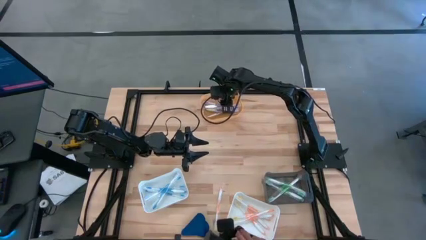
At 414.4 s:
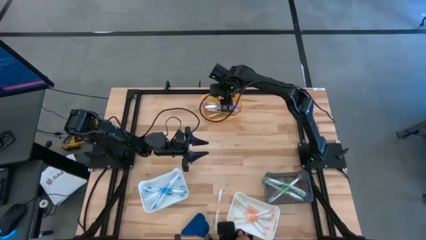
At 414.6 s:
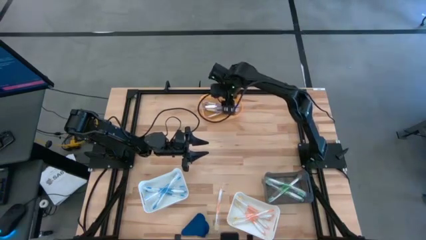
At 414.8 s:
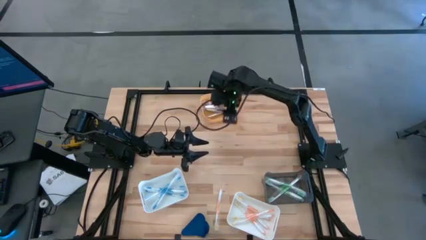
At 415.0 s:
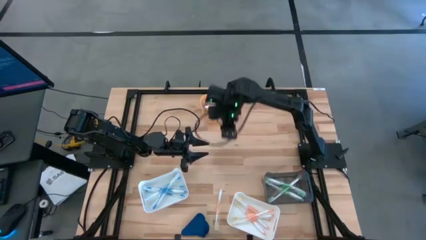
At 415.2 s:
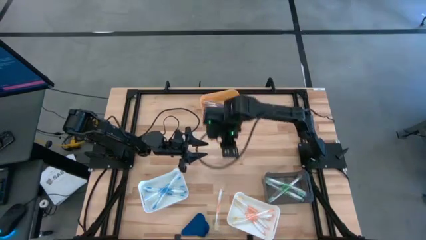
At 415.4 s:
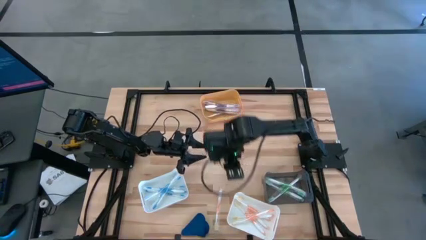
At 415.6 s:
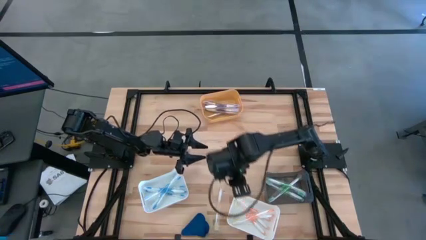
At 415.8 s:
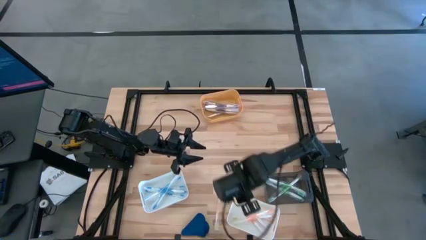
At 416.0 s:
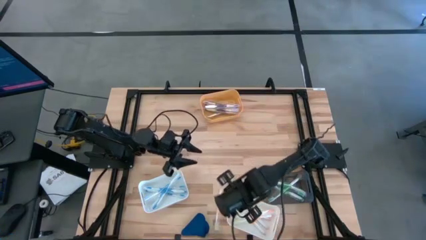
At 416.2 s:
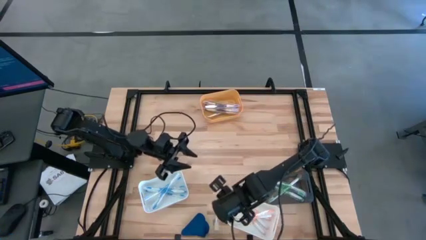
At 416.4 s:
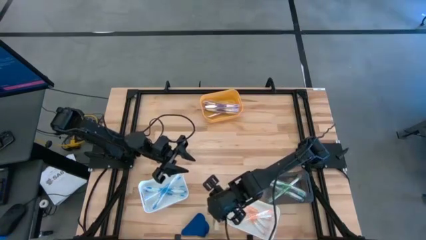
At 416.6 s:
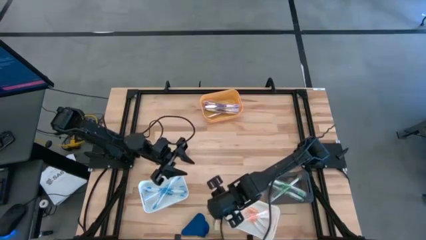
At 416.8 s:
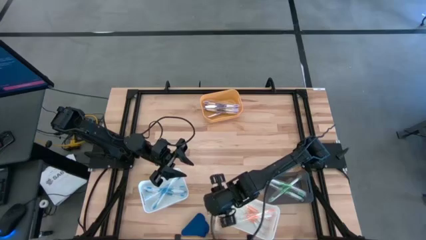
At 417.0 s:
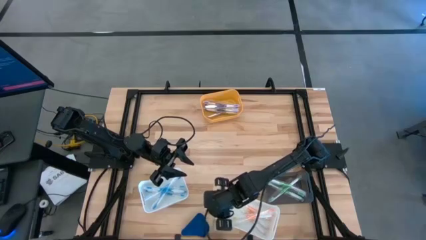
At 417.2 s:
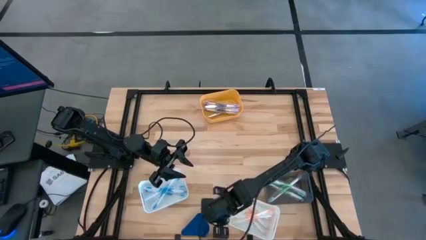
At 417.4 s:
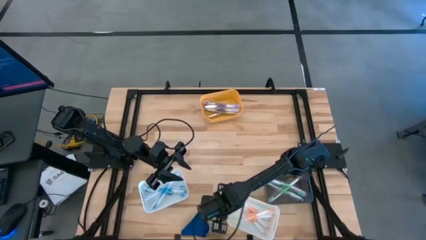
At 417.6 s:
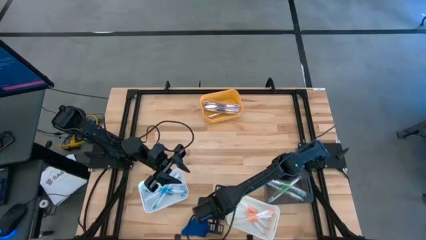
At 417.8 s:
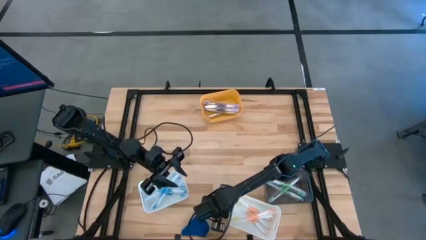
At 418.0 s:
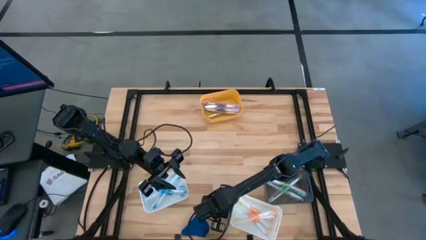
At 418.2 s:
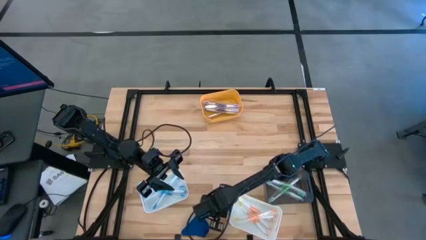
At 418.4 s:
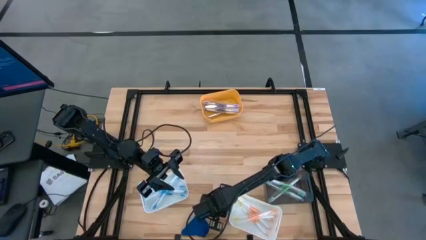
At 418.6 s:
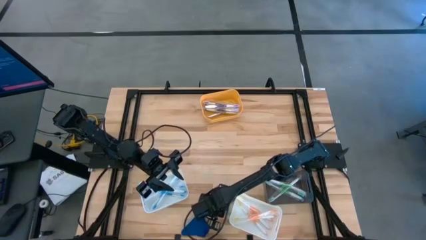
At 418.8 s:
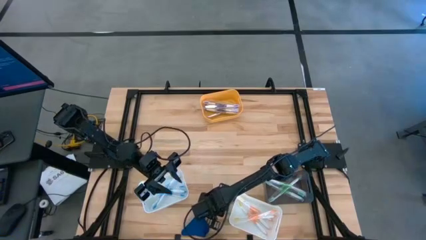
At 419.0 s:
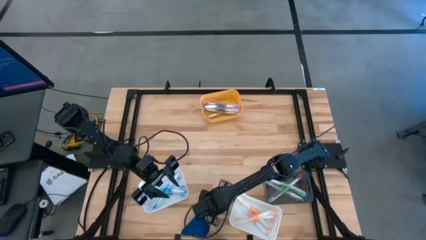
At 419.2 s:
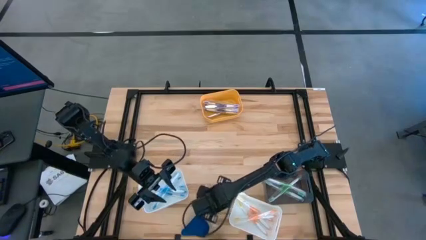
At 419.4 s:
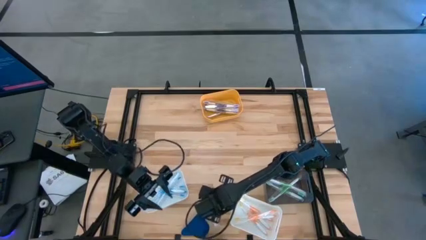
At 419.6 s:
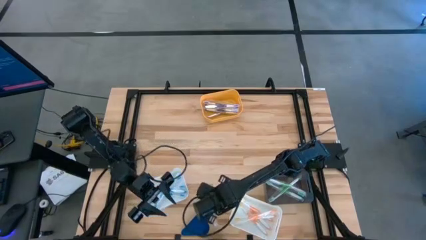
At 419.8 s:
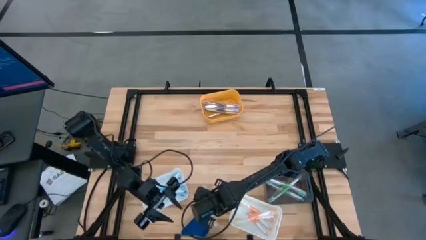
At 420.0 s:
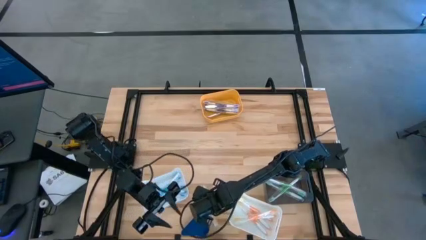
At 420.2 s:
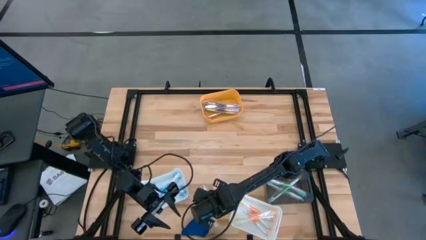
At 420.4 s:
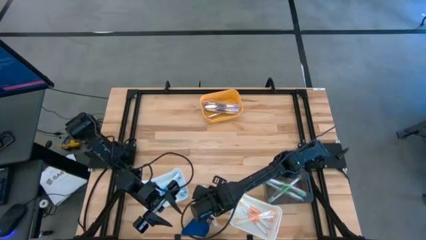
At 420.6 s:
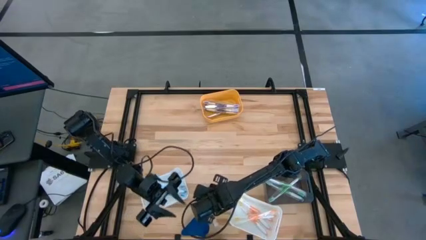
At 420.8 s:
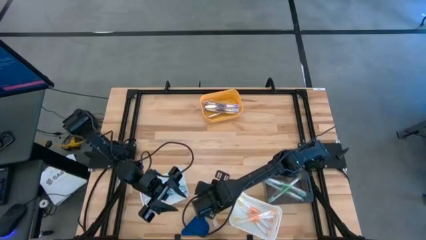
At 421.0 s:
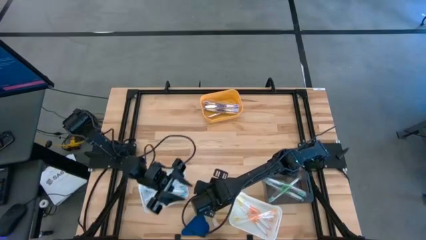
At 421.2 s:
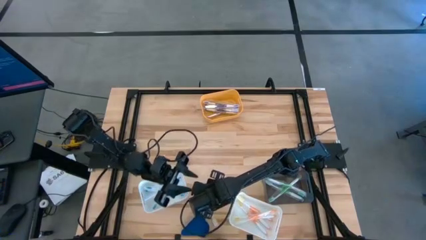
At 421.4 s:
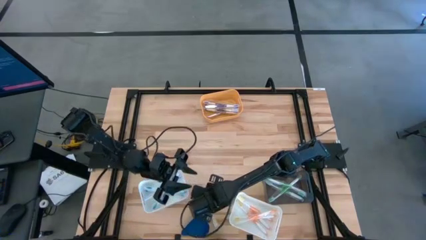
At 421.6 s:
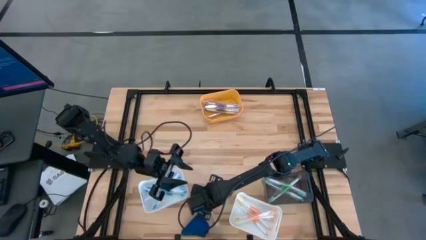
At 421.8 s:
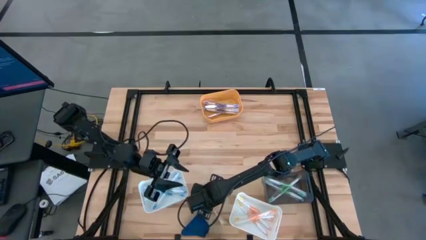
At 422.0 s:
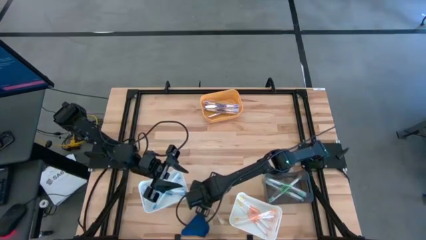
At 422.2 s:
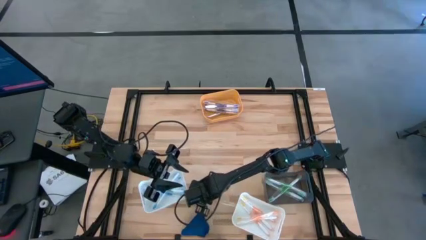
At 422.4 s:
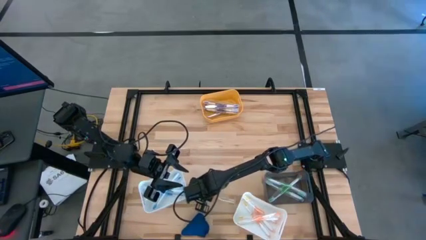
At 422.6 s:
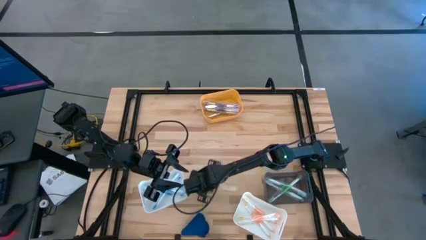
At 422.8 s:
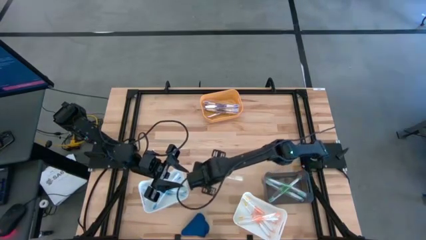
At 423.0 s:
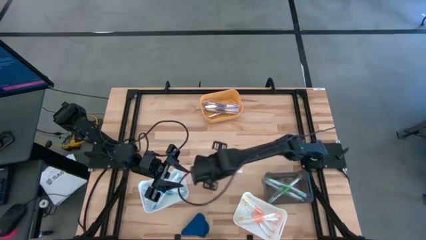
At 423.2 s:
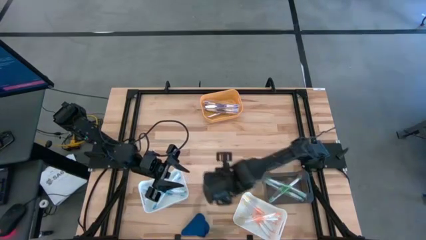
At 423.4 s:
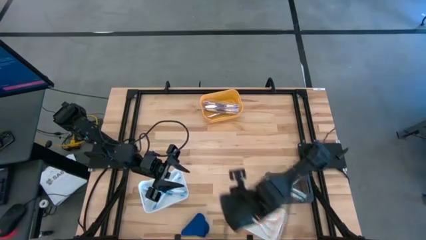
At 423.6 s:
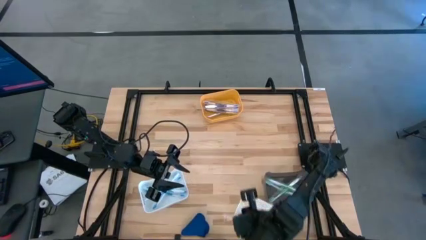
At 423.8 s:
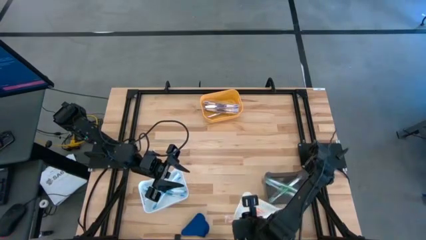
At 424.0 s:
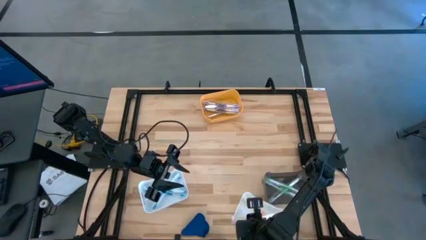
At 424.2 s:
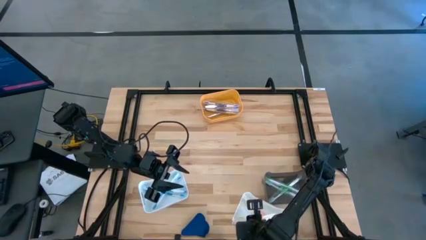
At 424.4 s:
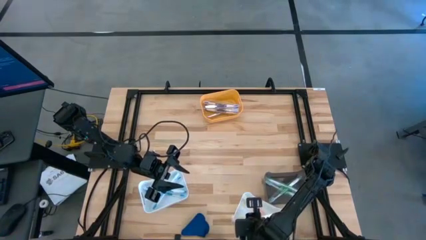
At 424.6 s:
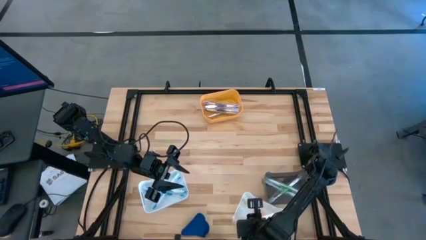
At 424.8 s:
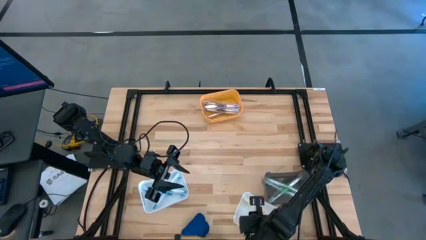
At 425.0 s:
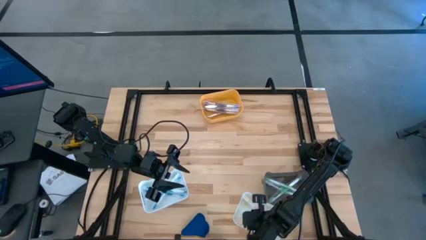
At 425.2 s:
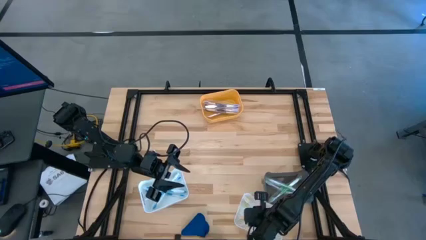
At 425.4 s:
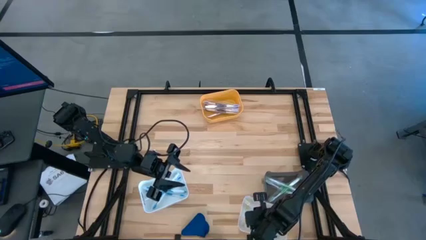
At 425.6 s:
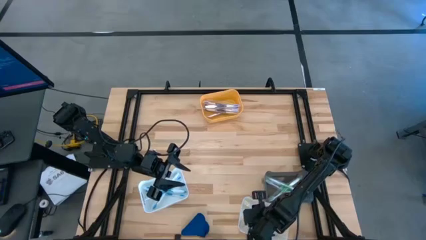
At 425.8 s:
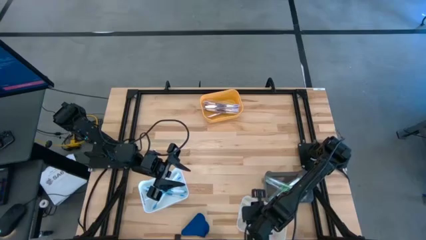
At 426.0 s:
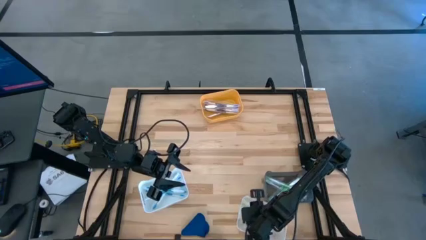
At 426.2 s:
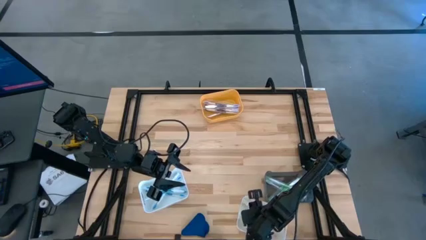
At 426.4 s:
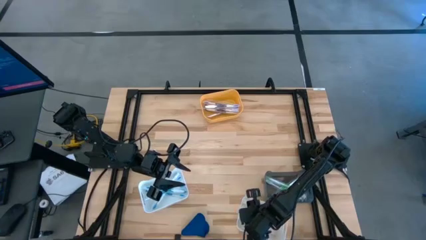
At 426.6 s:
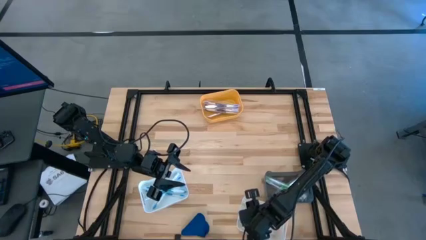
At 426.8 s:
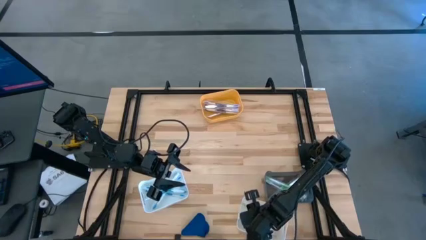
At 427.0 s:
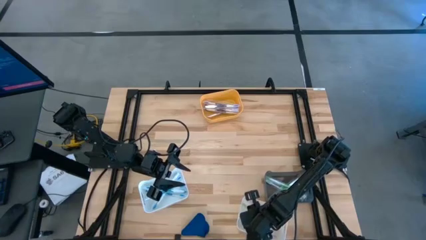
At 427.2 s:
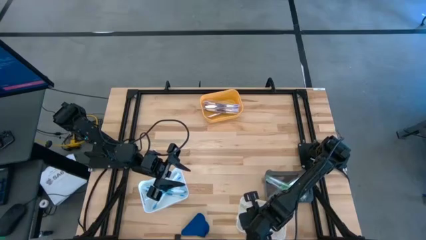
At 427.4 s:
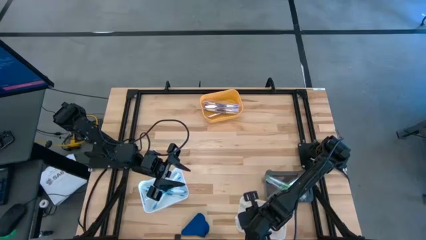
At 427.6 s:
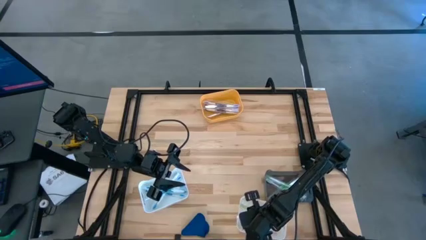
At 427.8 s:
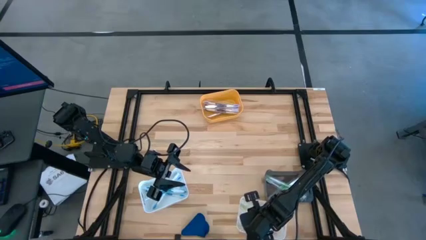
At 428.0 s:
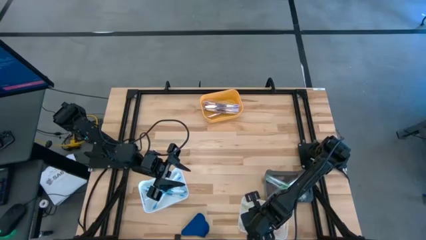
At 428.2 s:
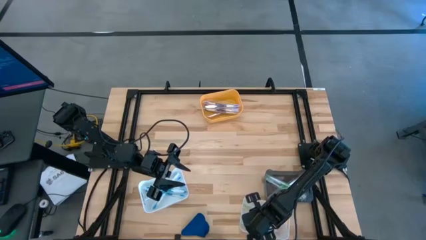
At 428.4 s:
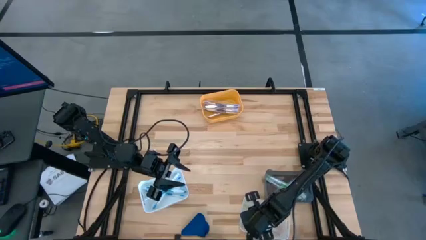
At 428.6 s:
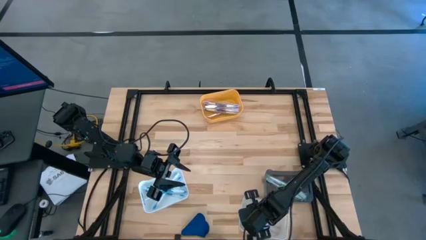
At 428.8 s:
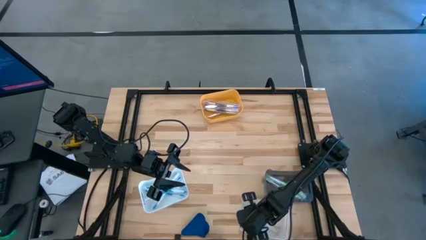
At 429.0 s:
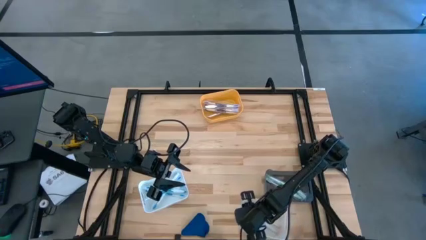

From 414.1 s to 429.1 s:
Task: Pick & Place Toothbrushes
Put the orange toothbrush into the right white bin

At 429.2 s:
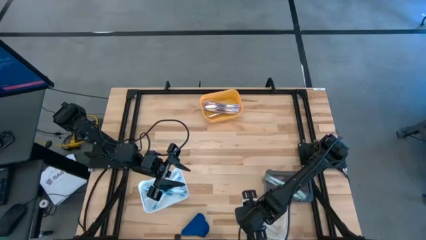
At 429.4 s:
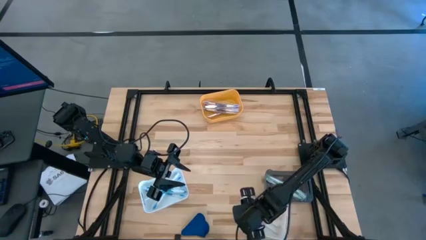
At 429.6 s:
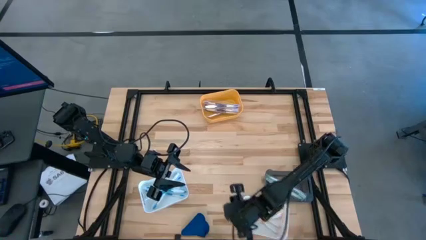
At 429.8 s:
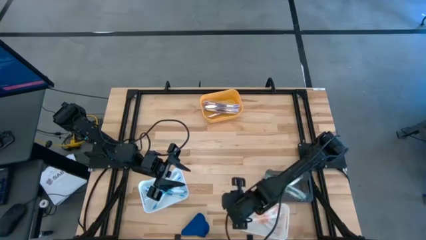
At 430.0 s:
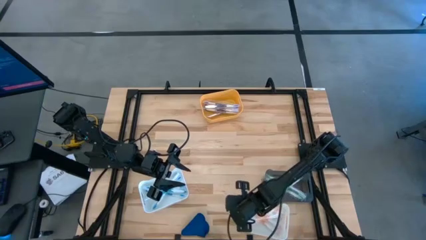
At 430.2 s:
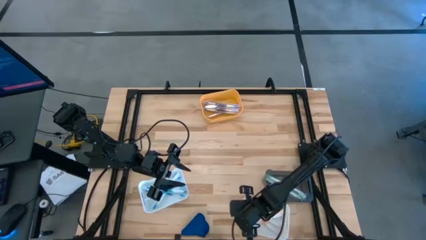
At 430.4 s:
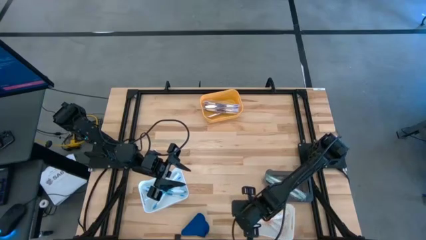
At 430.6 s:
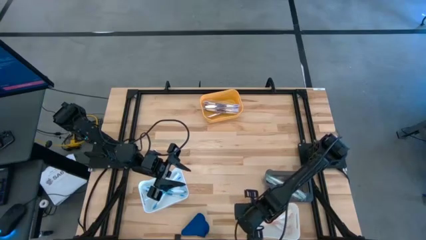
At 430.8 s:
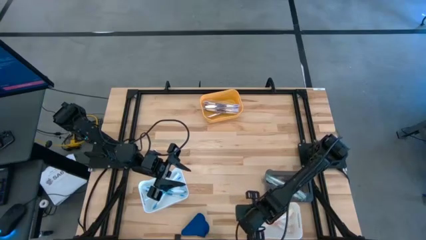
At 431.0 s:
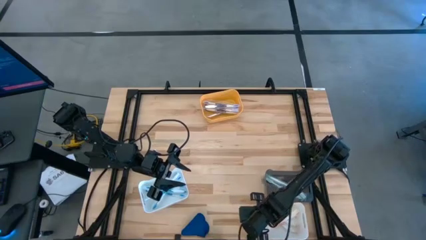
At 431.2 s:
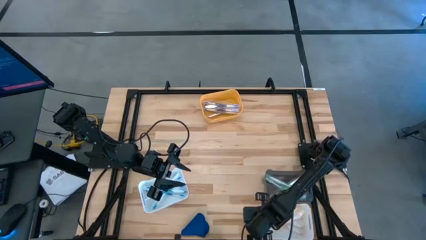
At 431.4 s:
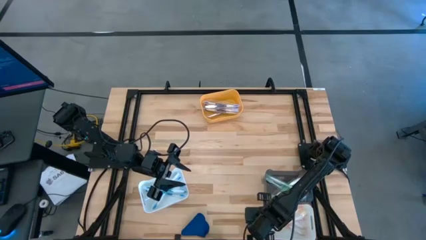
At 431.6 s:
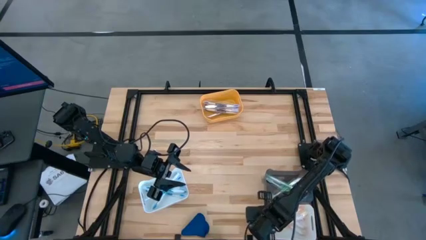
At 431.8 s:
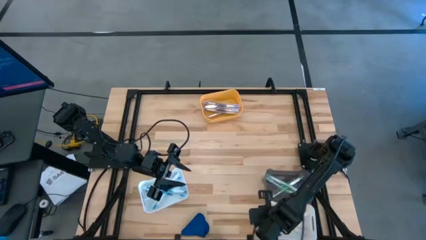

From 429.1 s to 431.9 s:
Adjust the right white bin
